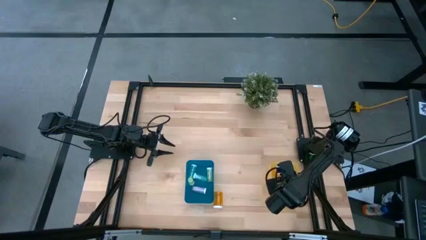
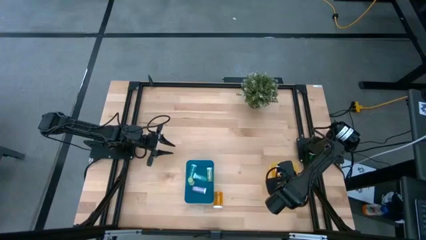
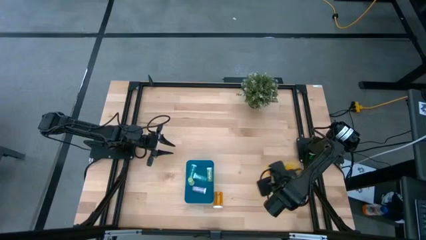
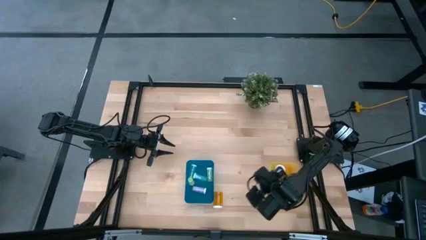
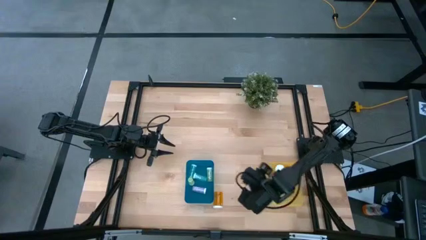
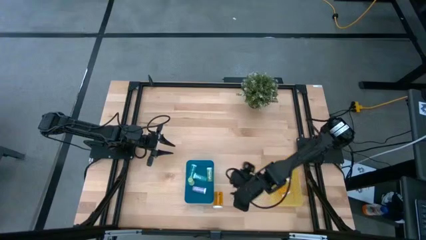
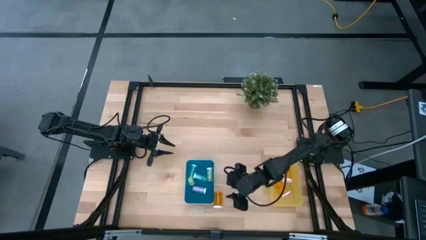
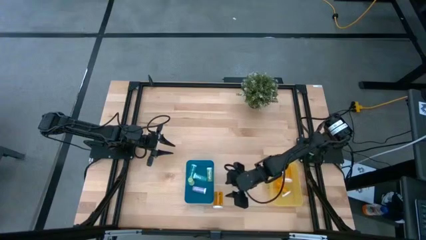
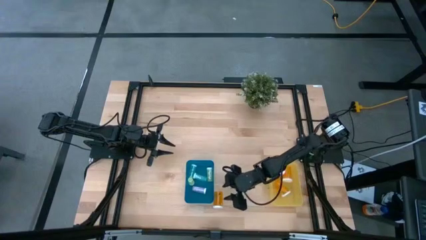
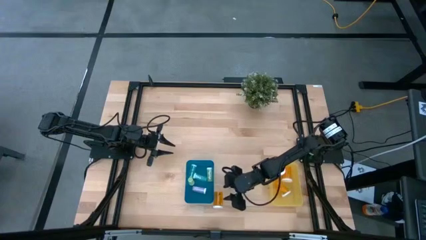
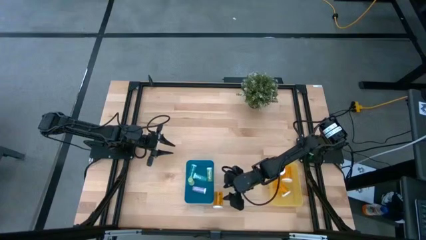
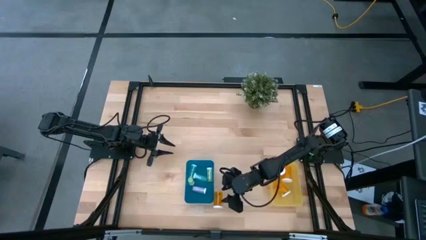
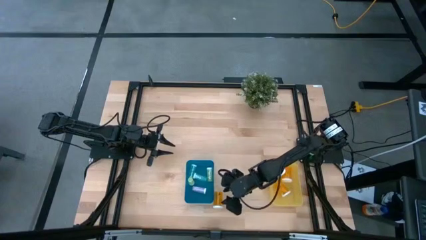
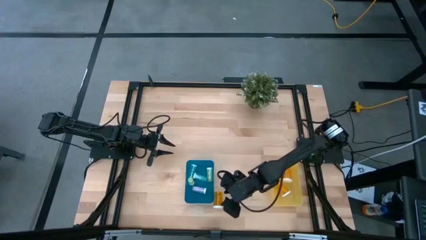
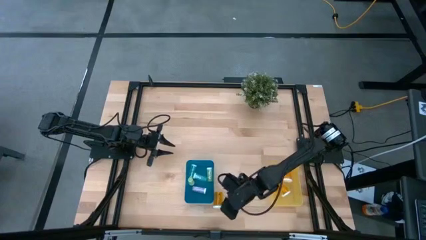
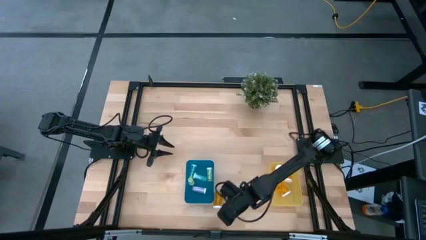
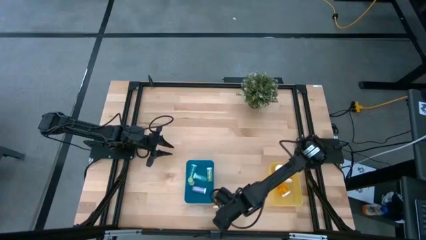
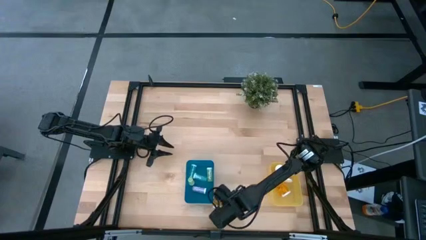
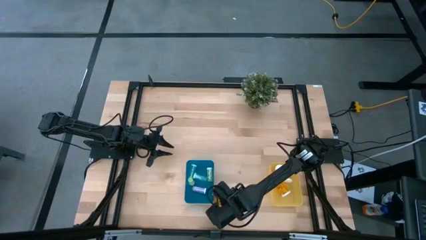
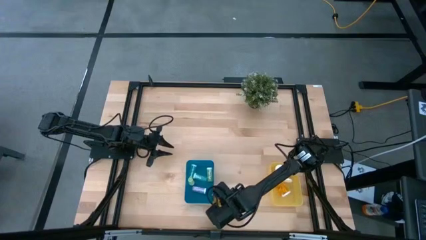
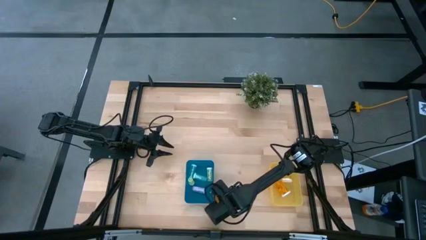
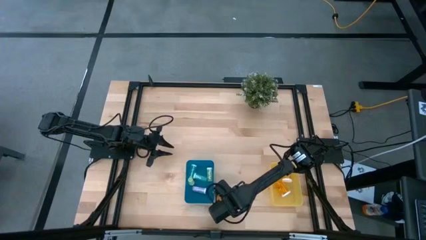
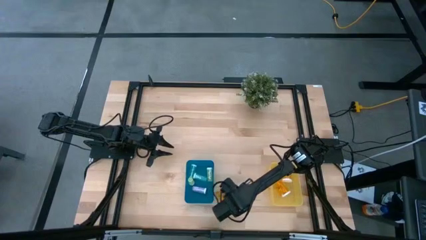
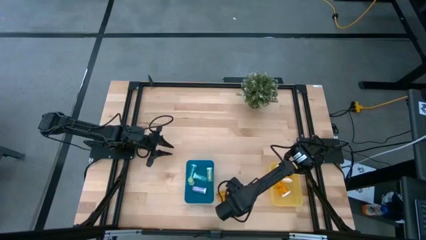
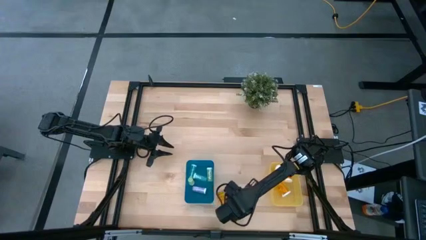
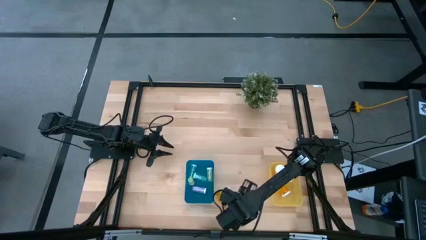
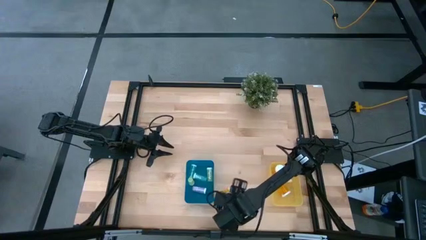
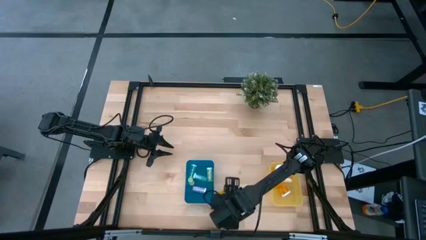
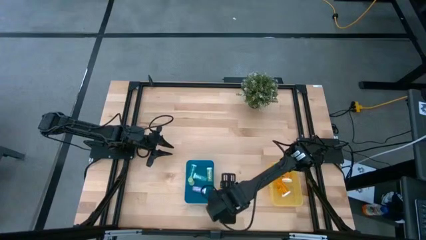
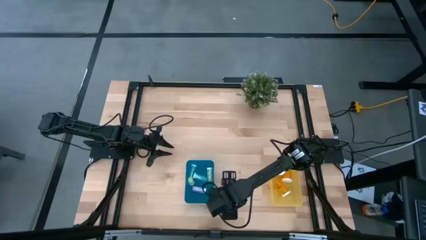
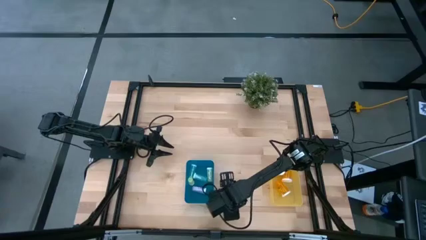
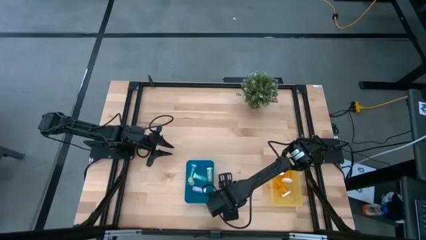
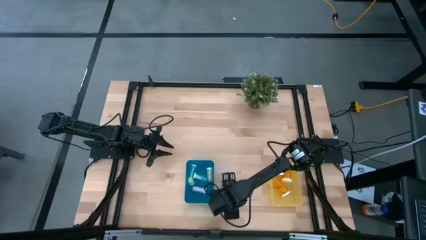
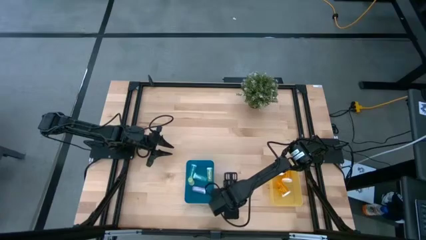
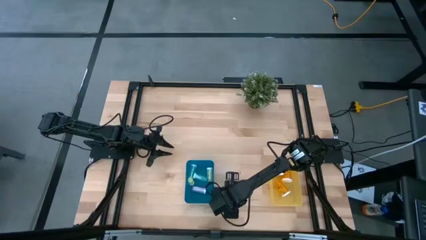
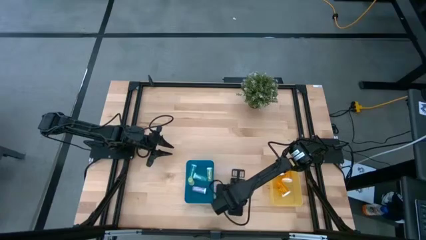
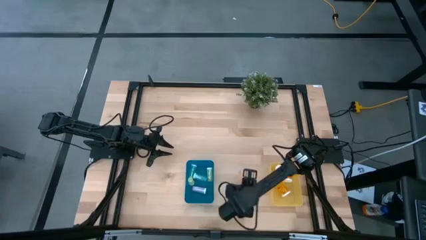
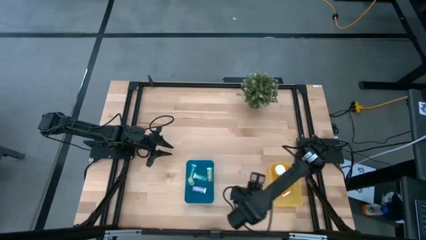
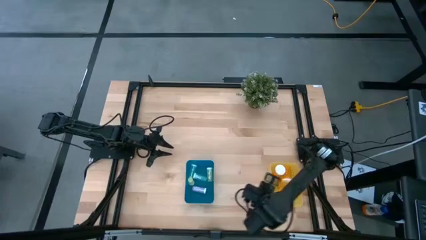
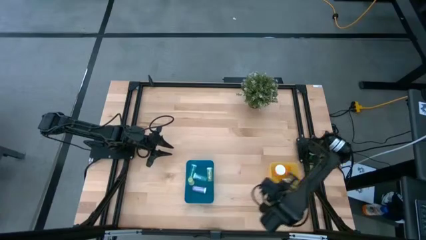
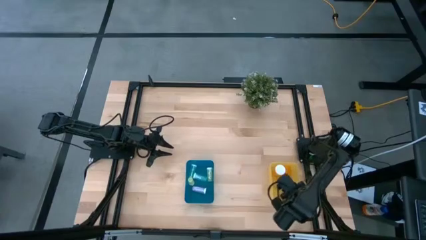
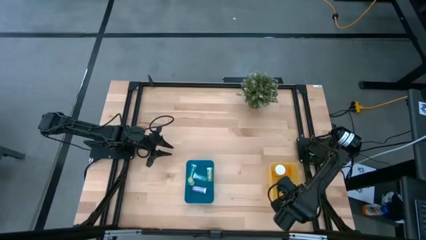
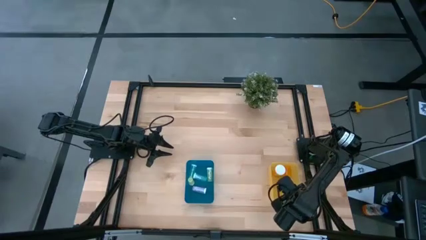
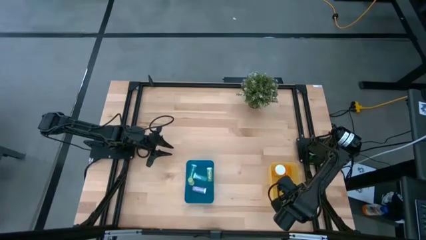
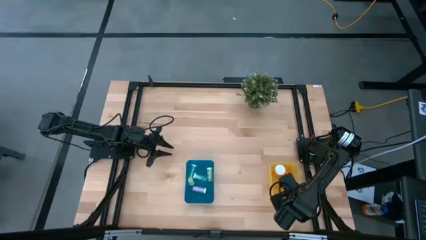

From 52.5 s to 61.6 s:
Task: Pick and place medicine bottles into bin by pill shape (circle, oval)
Put the large orange pill bottle into the yellow bin

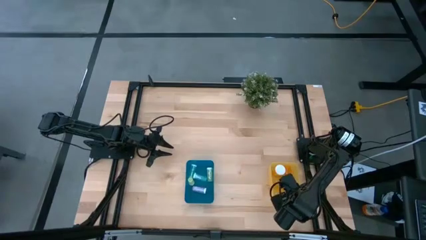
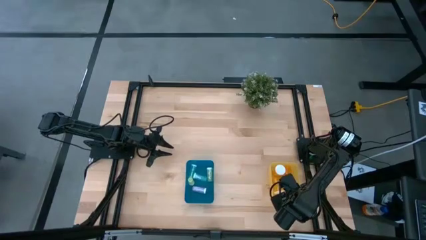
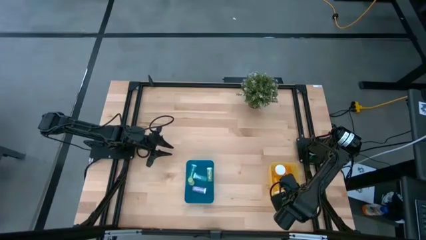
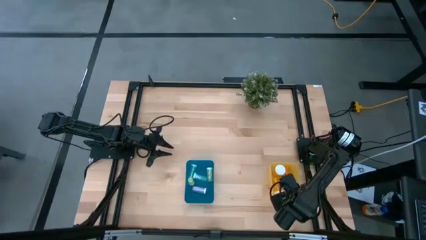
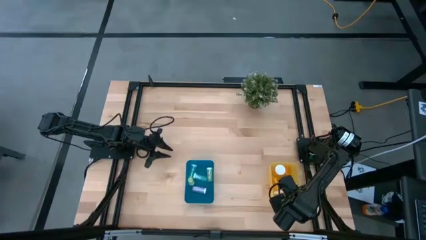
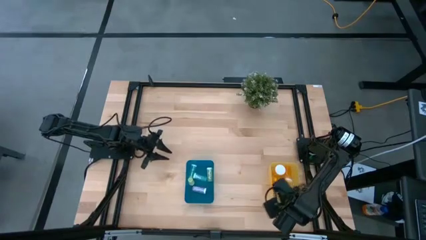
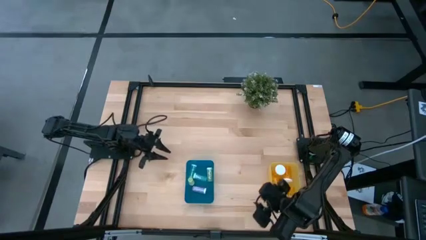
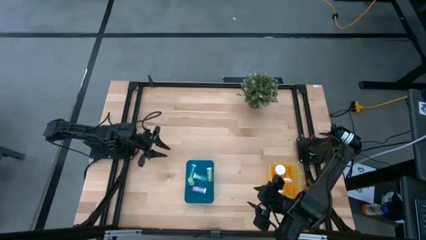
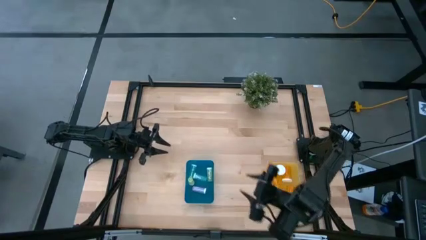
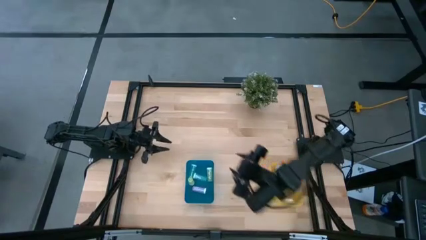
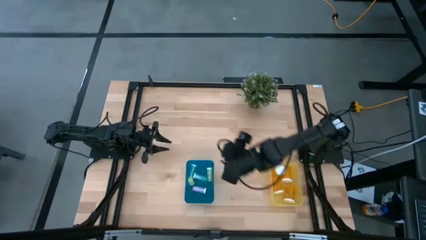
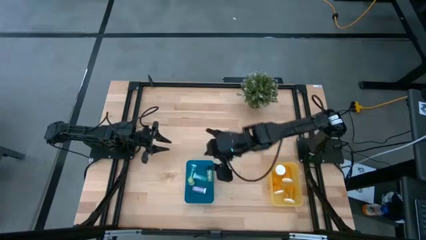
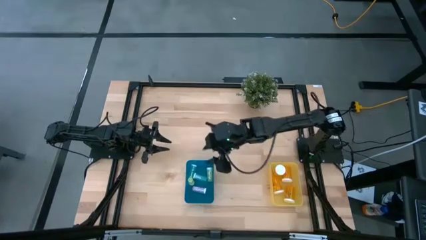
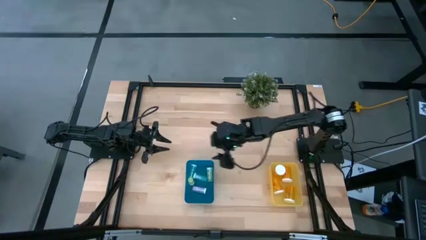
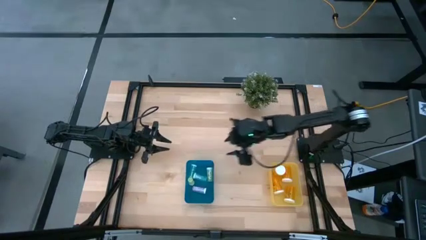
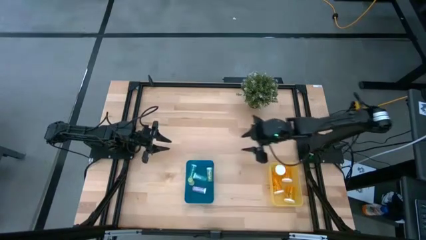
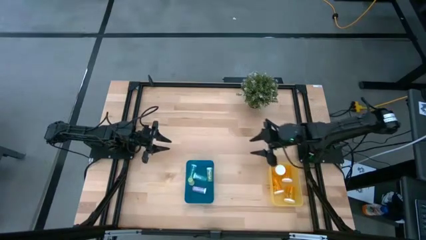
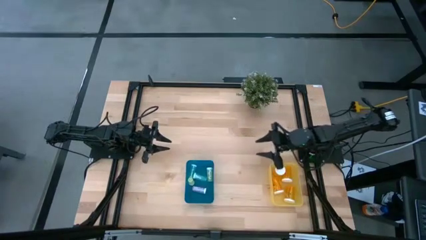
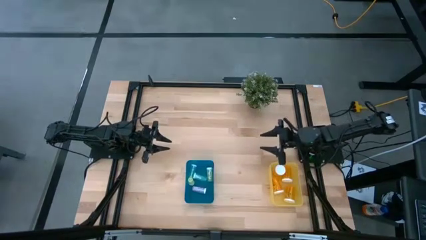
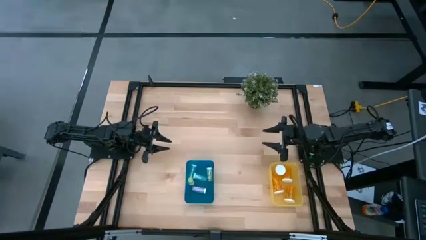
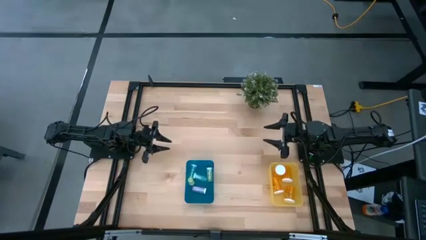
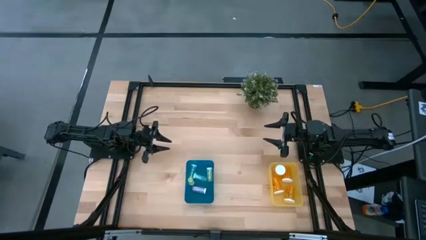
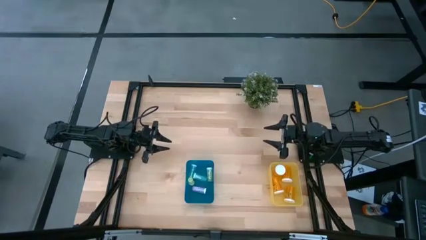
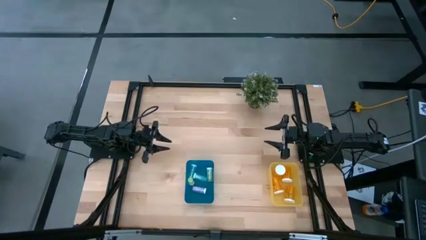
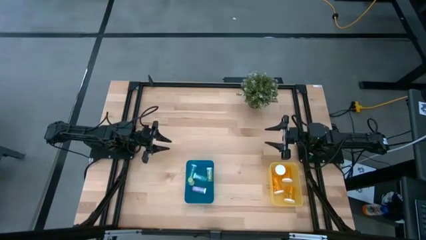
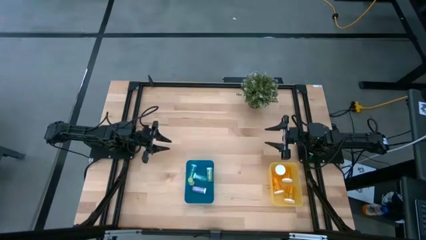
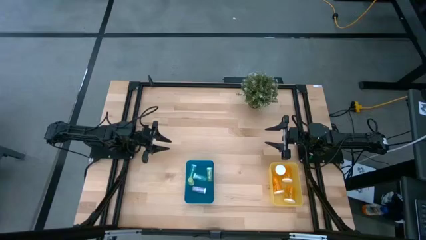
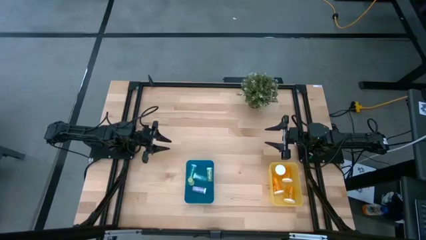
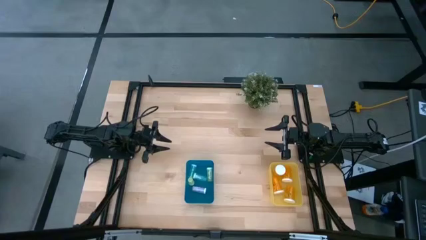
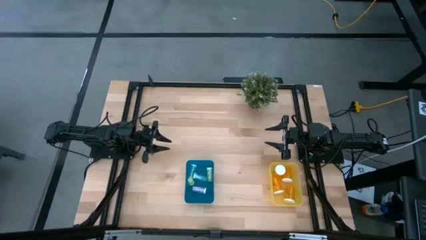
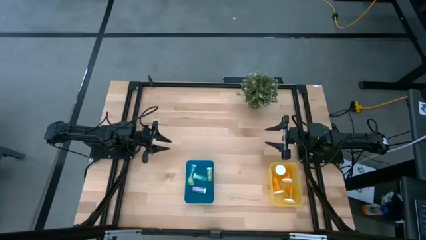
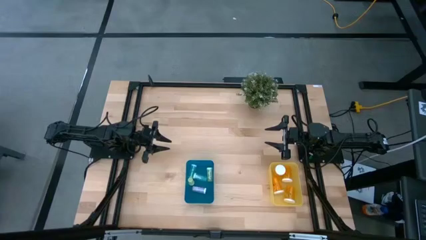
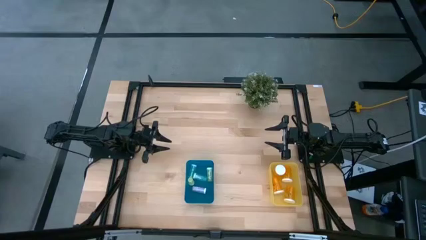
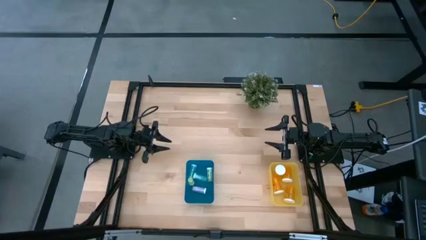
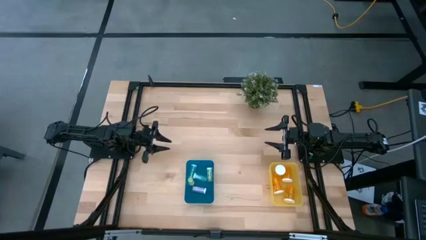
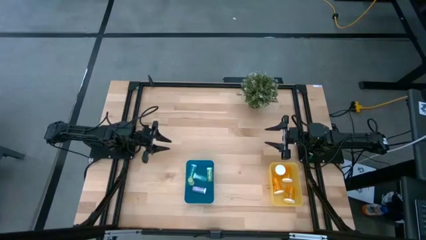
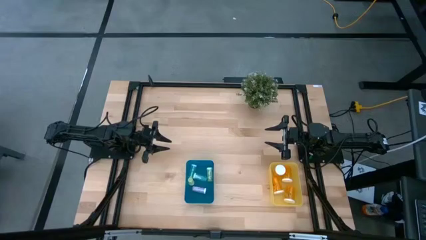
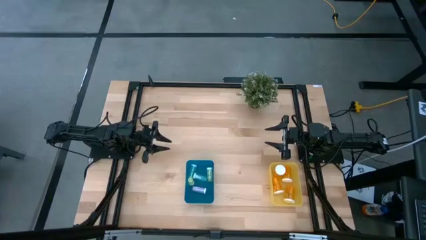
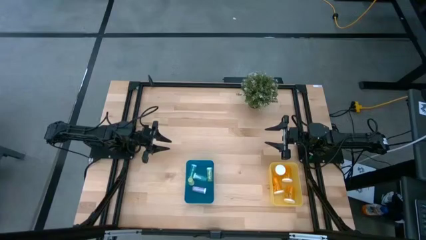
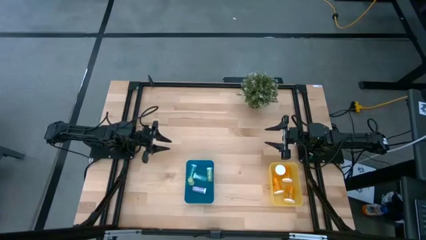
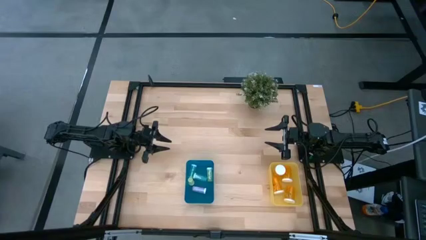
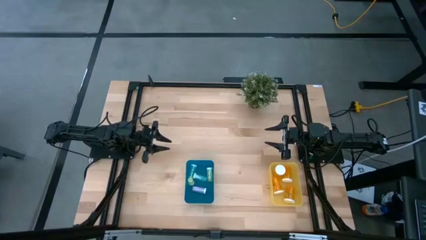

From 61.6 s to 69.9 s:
Return to Home Position
